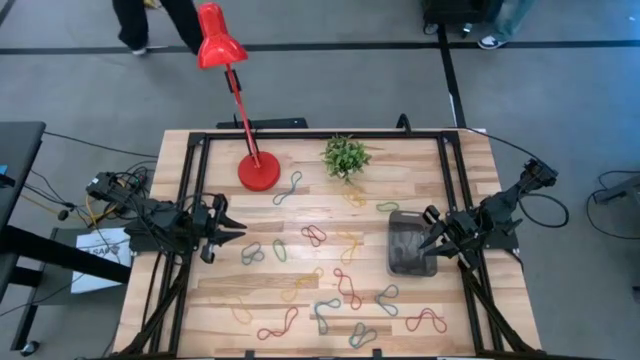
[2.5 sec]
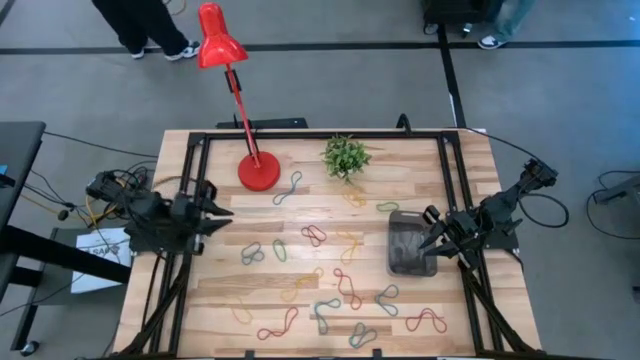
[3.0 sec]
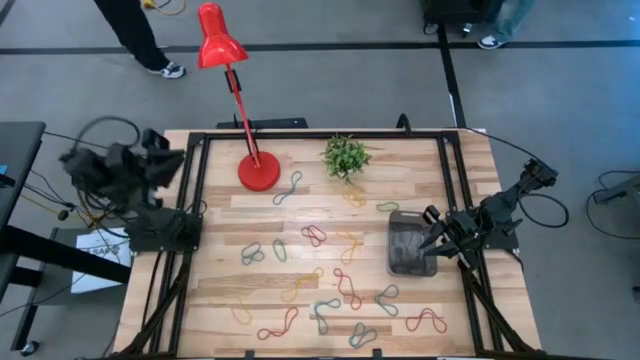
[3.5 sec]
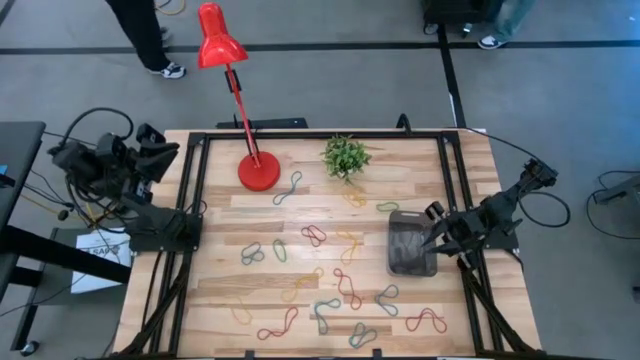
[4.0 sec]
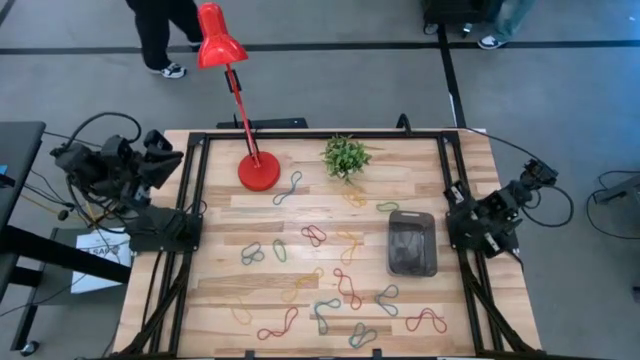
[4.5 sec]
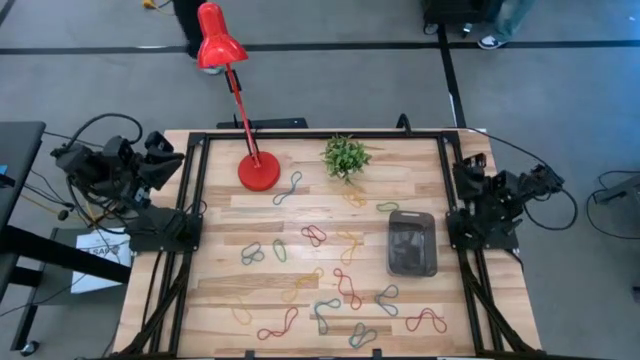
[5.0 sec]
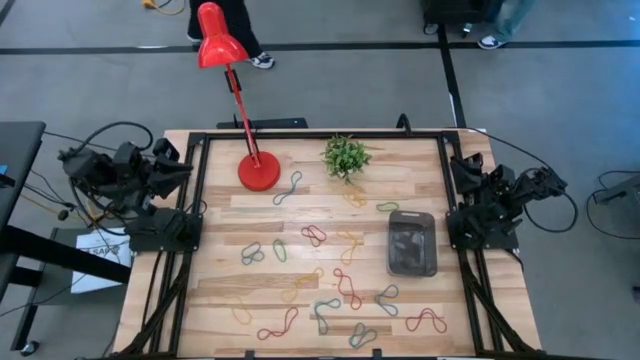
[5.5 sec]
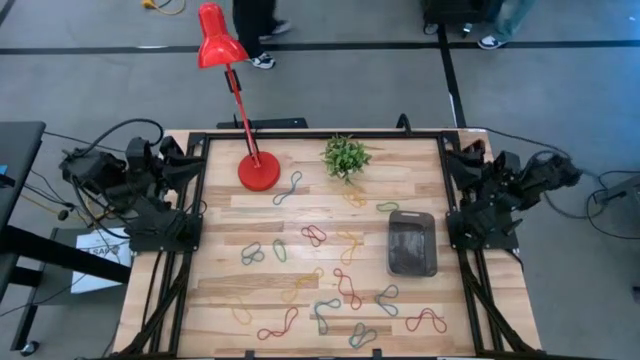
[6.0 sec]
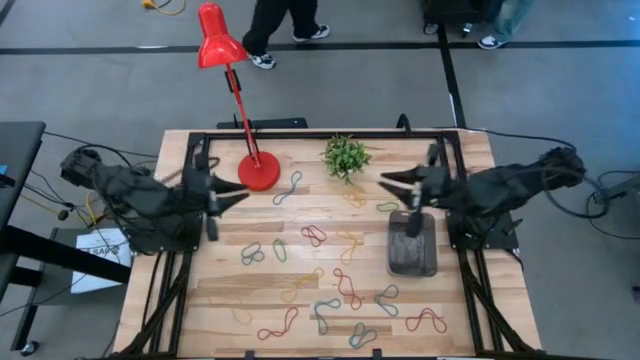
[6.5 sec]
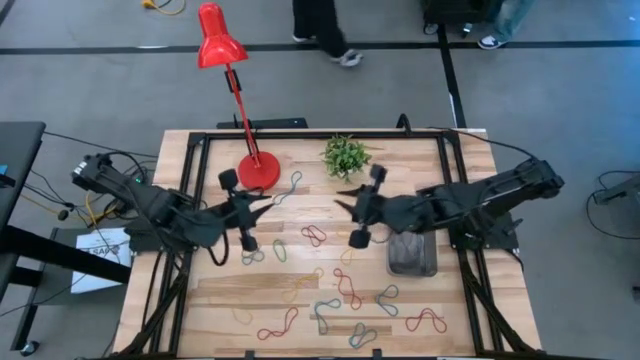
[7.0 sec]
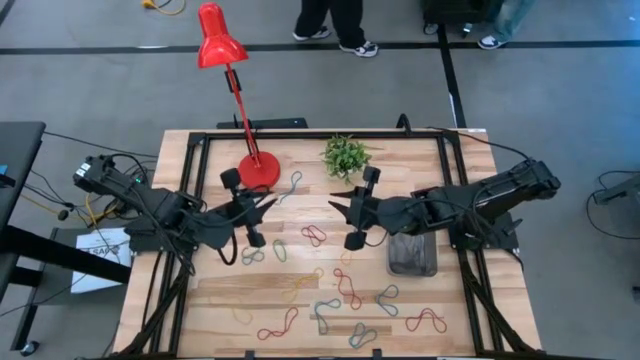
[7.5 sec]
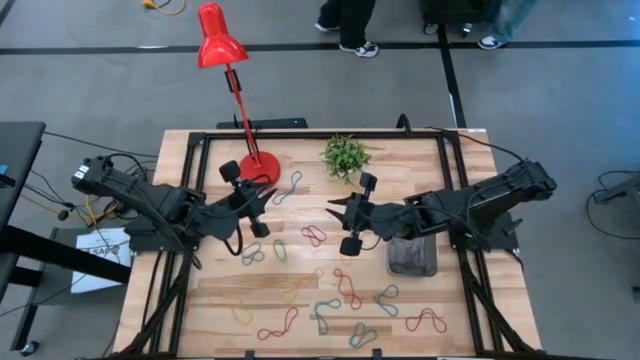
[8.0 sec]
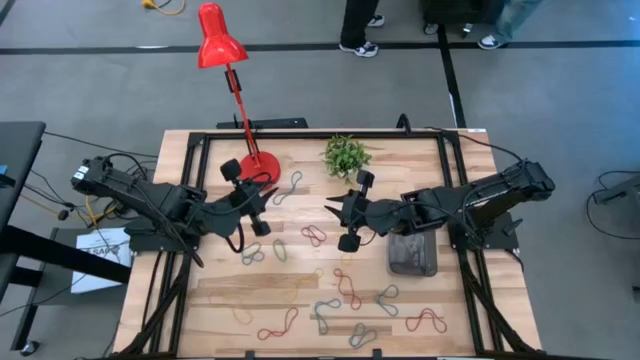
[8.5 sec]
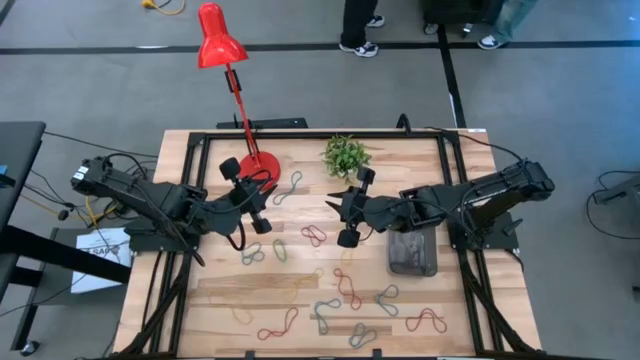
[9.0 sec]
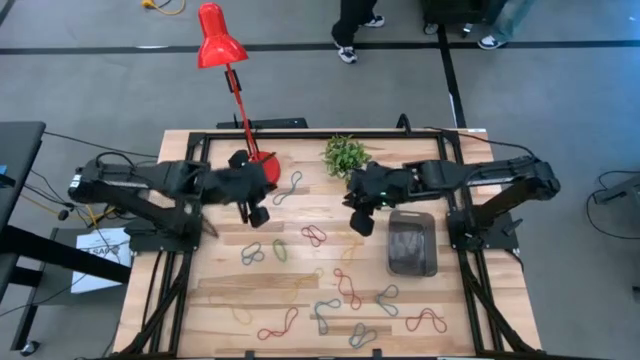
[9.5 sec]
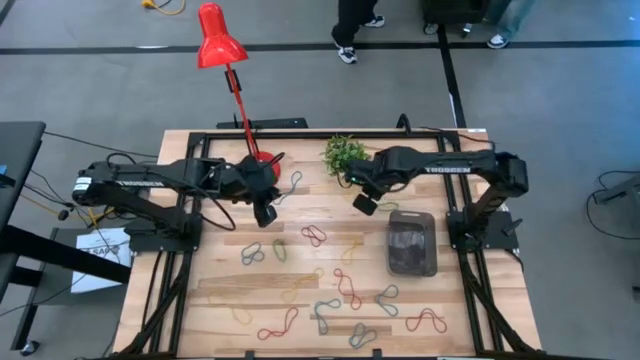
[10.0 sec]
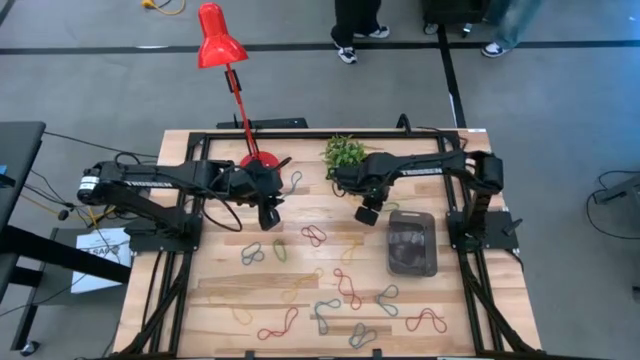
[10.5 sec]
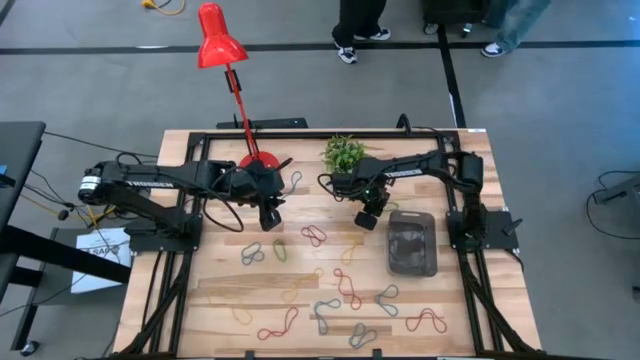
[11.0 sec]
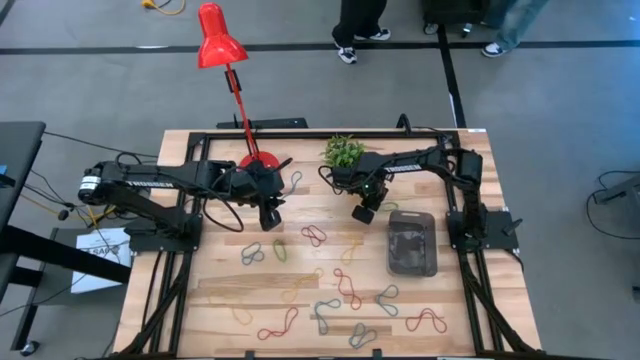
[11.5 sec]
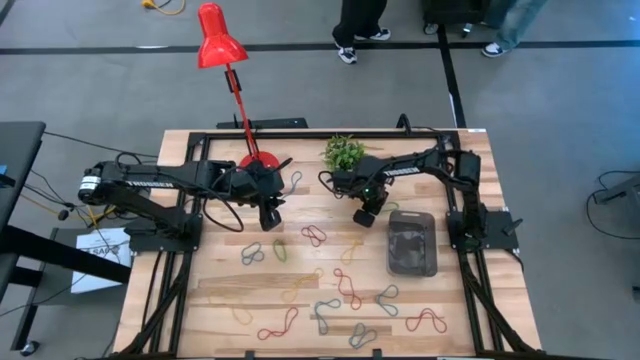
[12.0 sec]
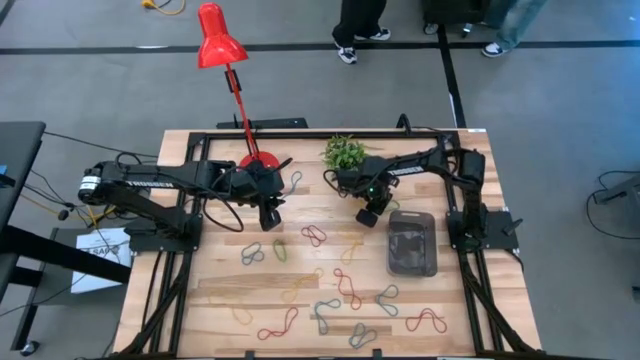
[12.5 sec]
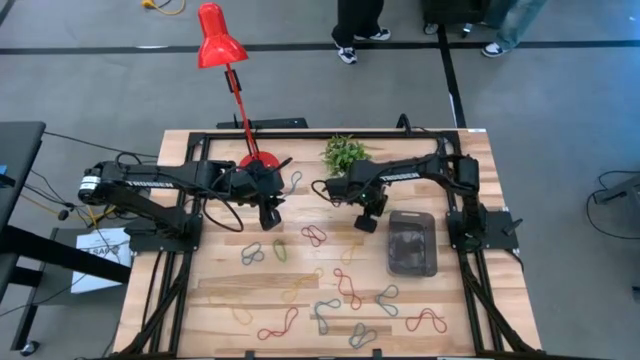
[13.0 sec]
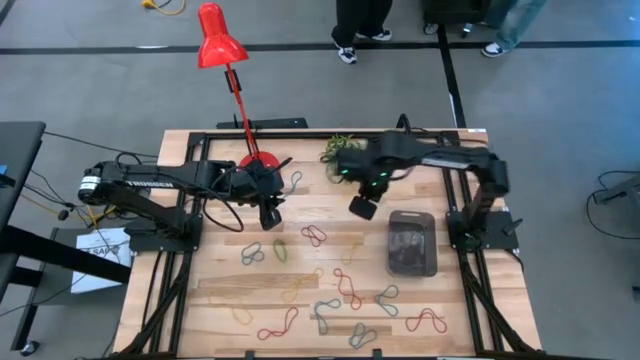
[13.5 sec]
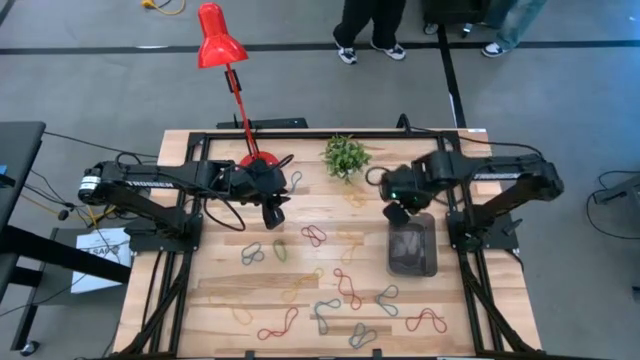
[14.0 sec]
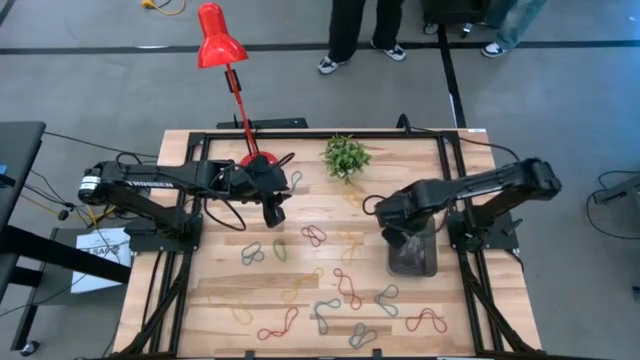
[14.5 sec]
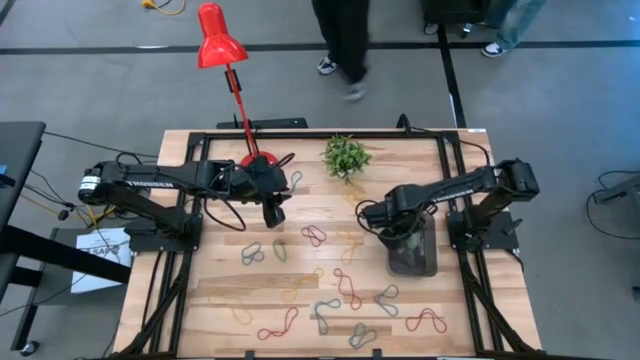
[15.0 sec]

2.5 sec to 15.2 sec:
Task: Pick and place items into bin
Put the green rubber band into the black bin

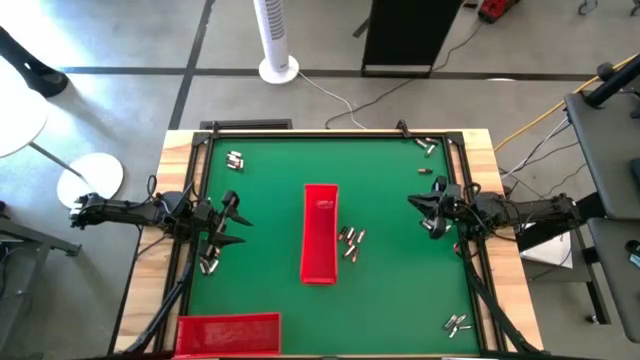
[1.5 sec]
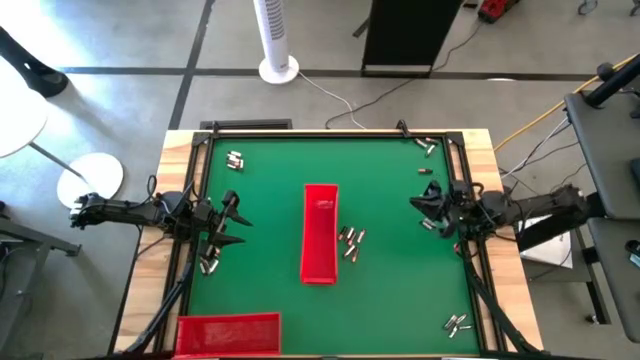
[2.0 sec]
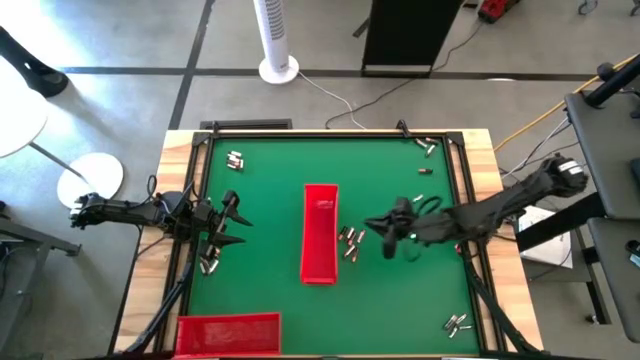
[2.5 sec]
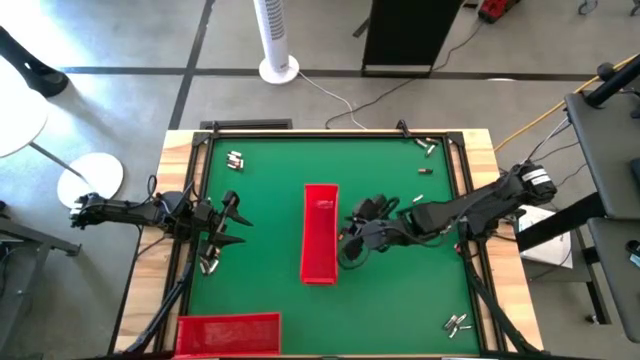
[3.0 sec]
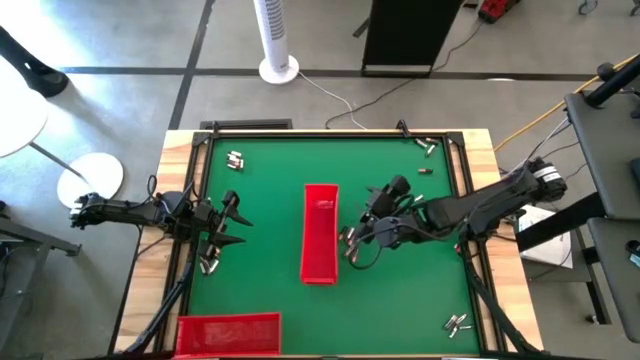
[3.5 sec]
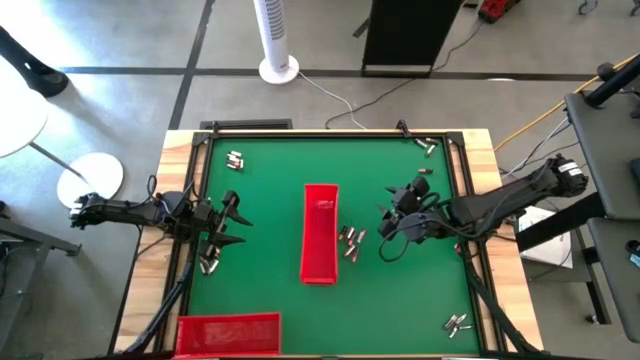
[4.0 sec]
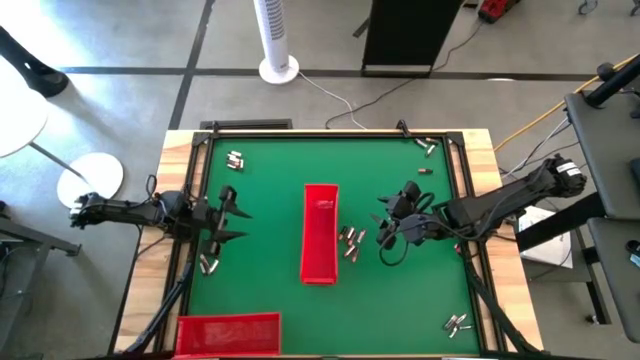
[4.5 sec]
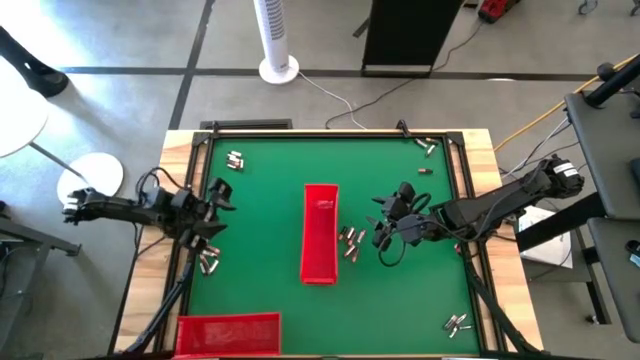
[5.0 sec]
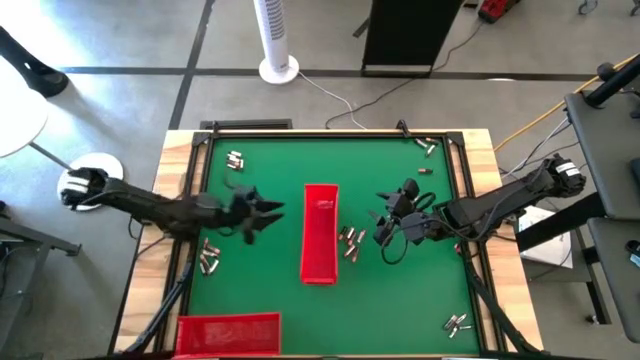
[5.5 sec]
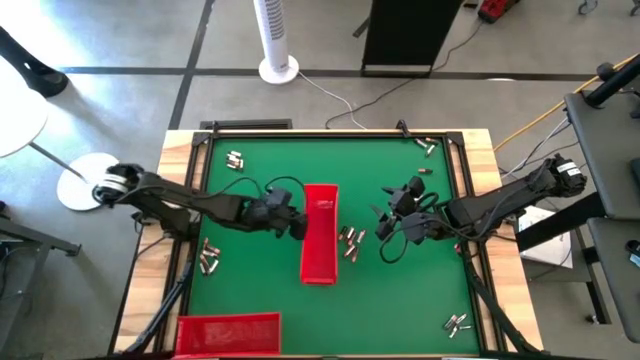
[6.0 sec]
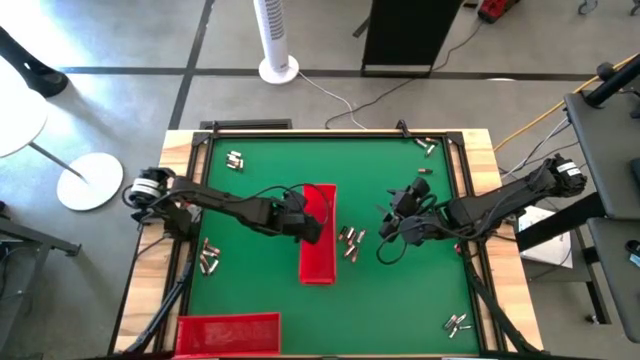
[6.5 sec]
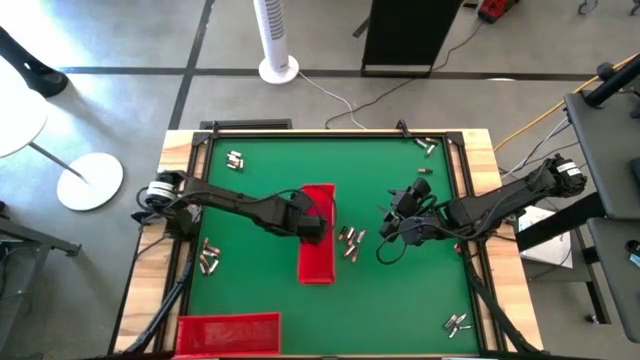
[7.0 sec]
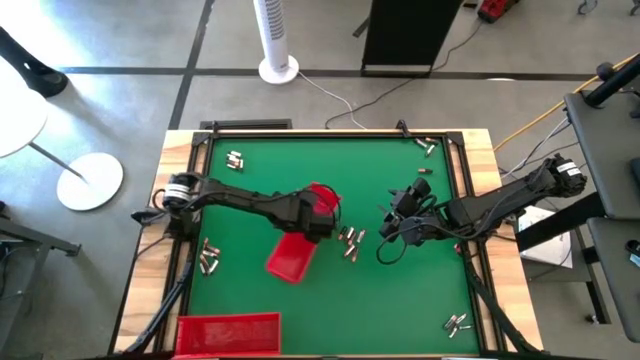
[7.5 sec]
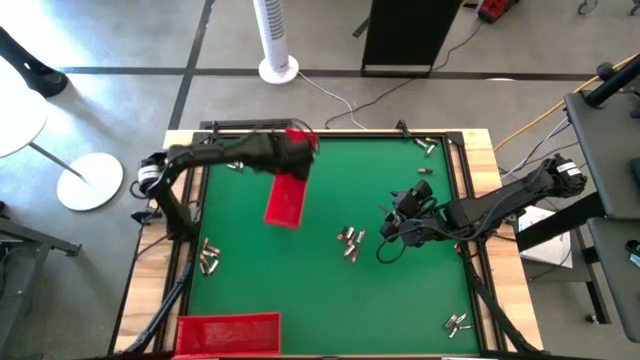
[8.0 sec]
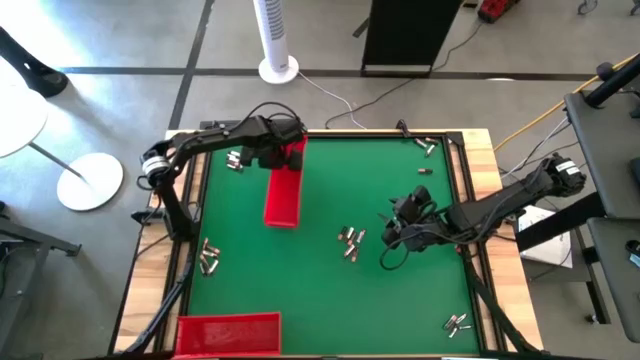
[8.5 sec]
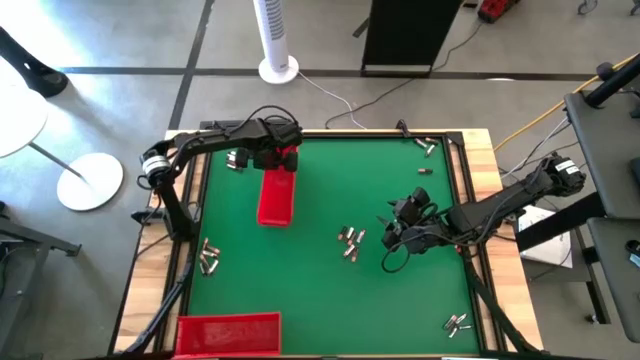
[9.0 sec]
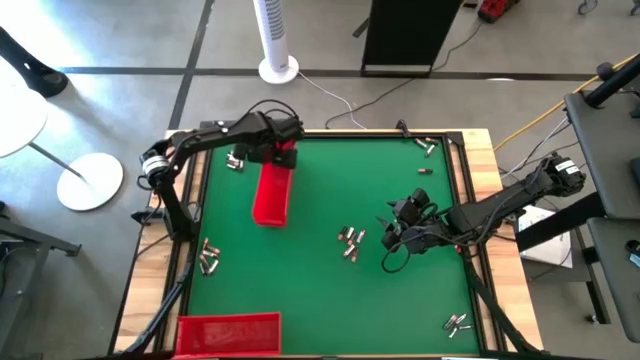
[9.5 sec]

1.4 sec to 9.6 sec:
Task: Sort batteries
Move the top red bin to the top left of the table
